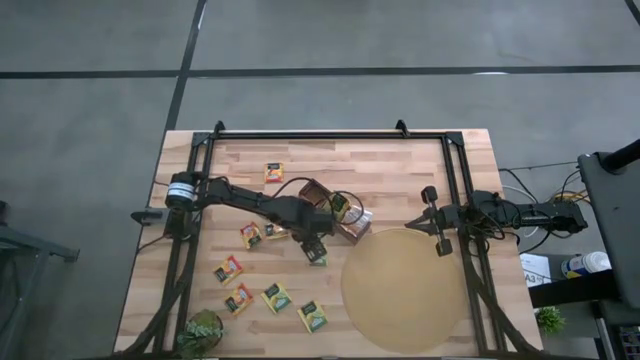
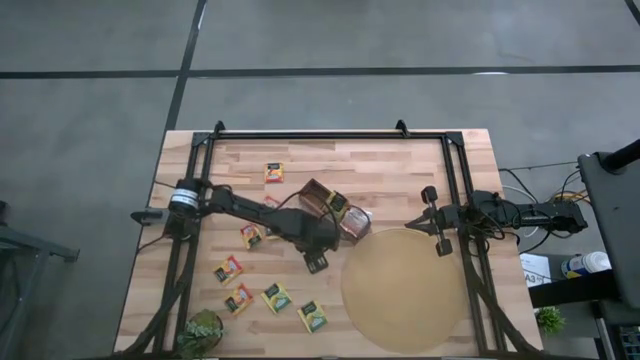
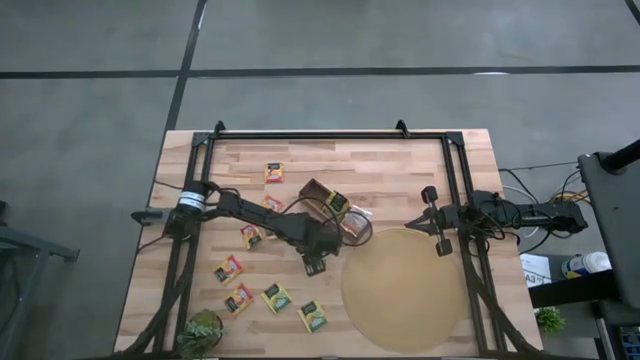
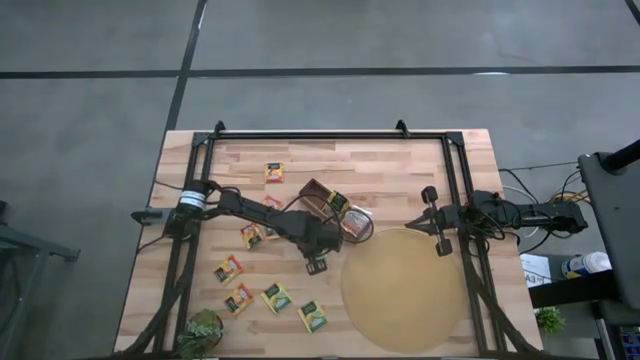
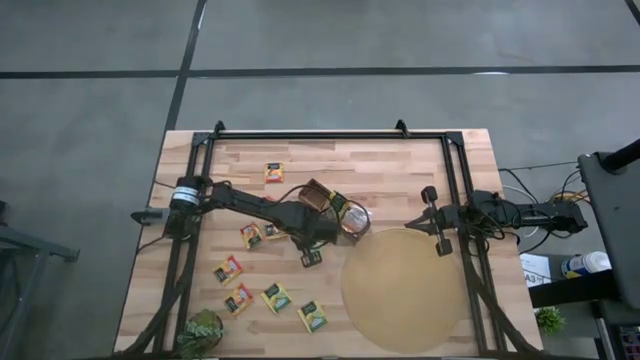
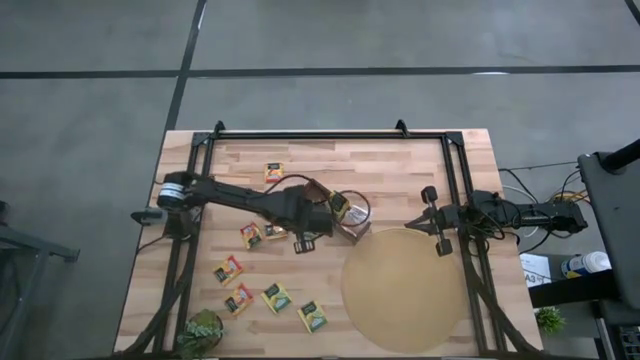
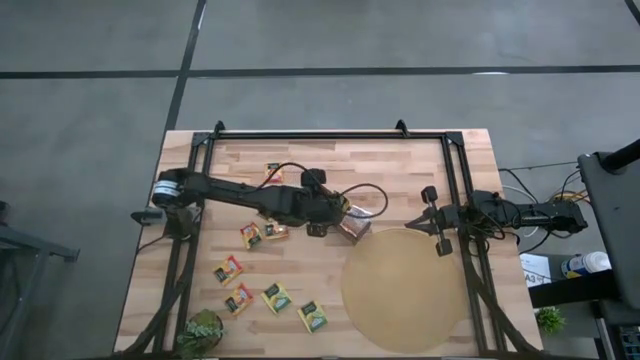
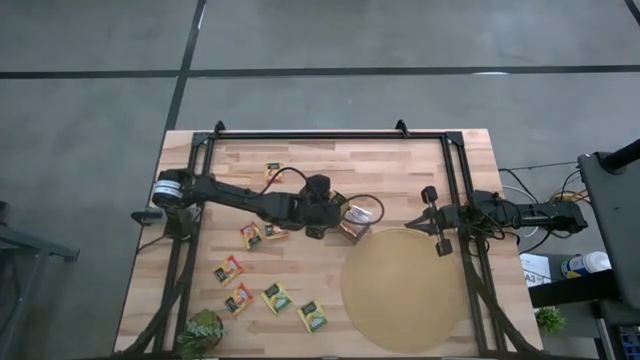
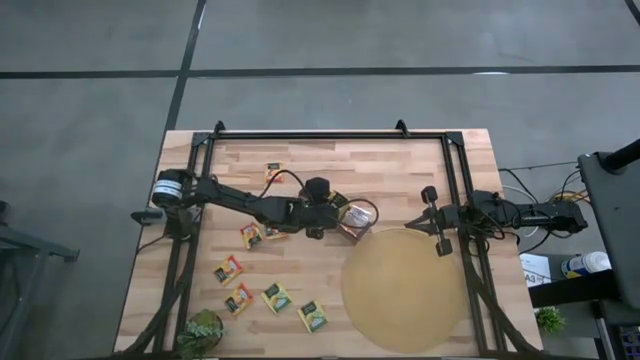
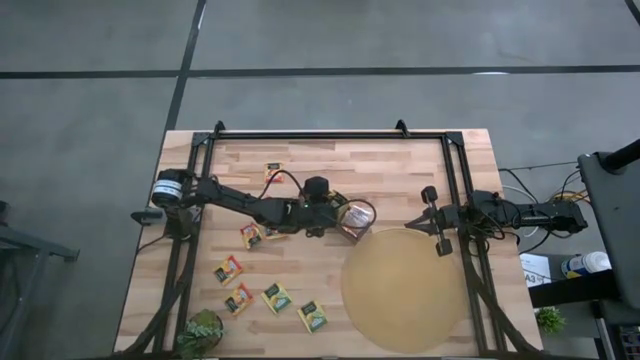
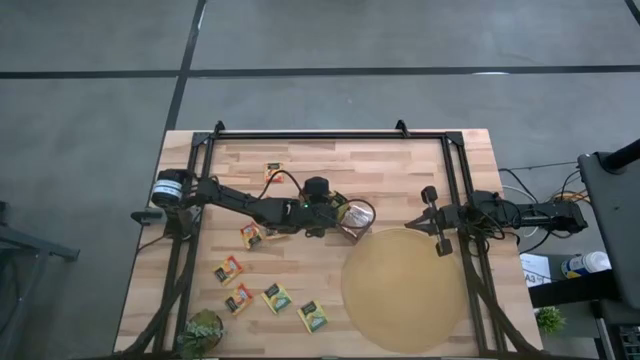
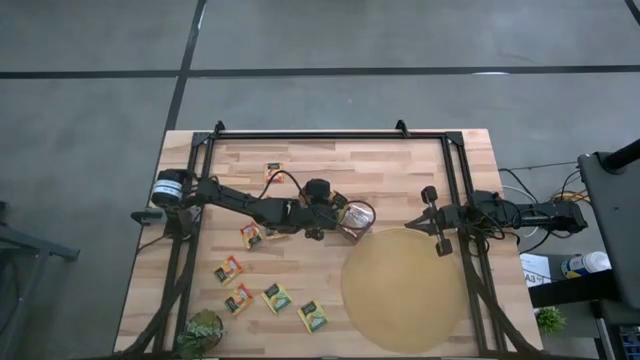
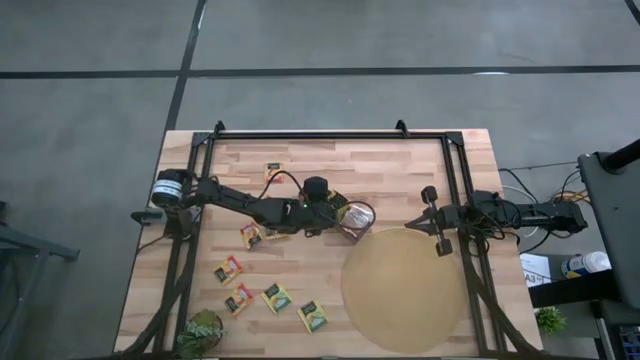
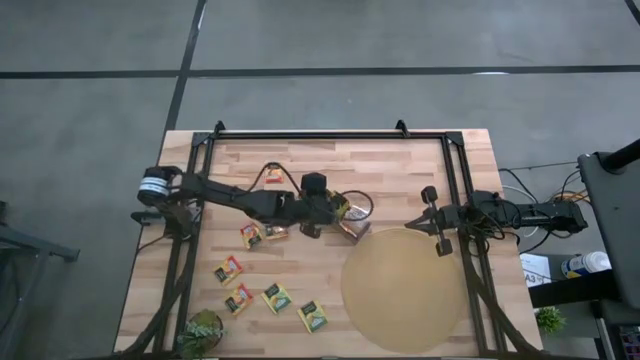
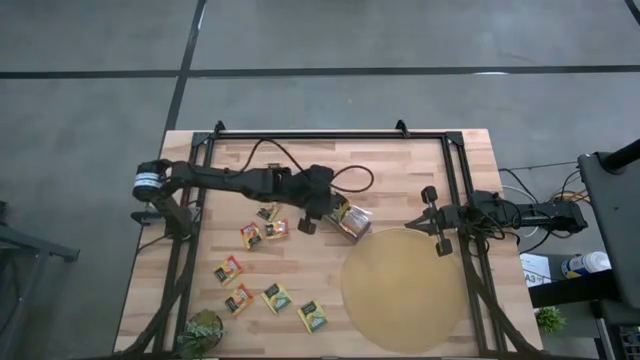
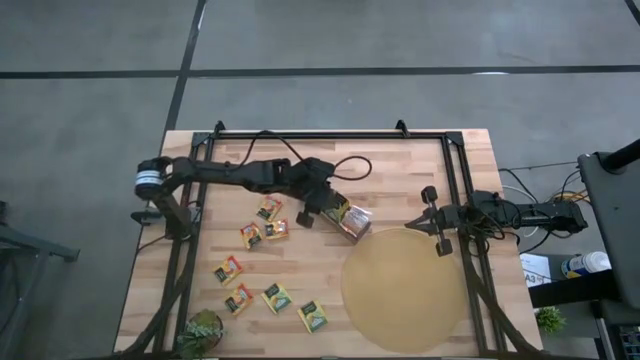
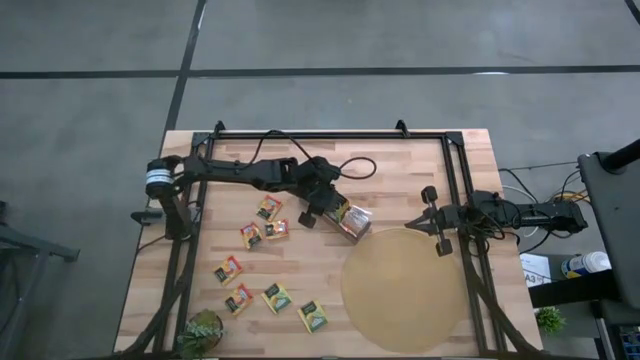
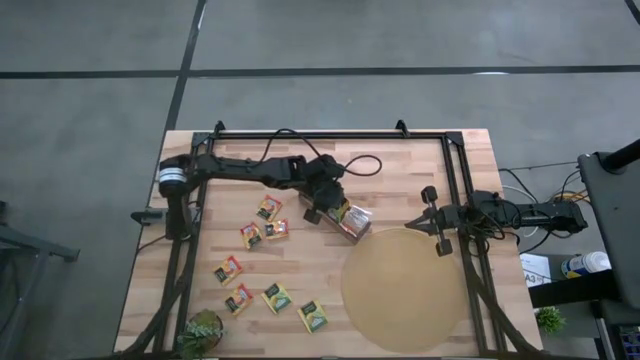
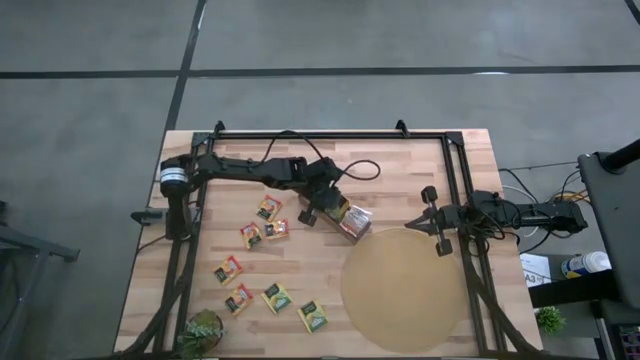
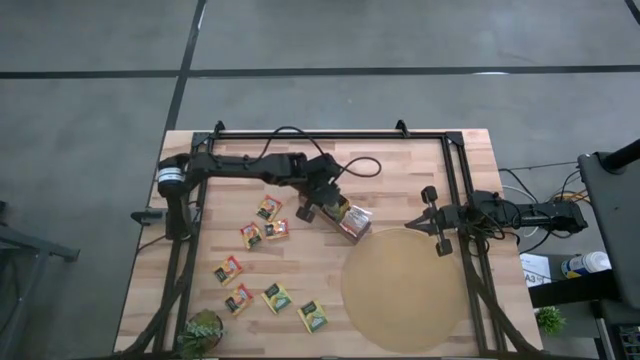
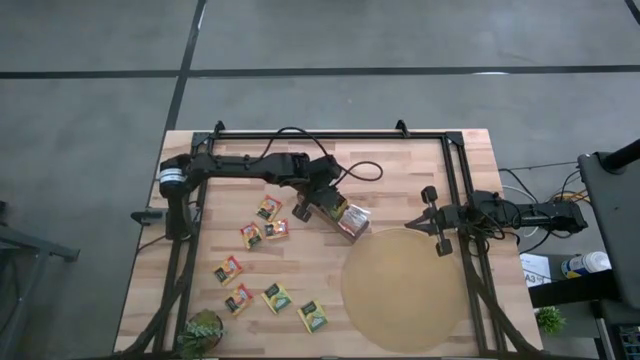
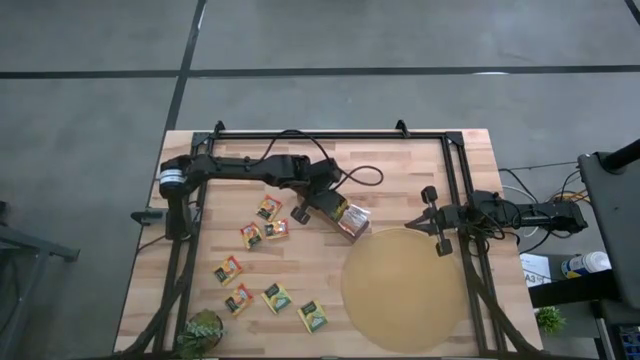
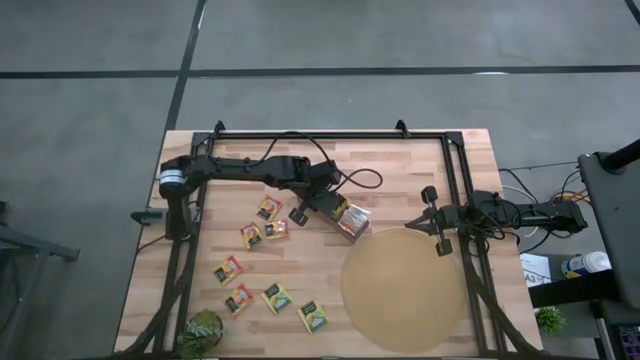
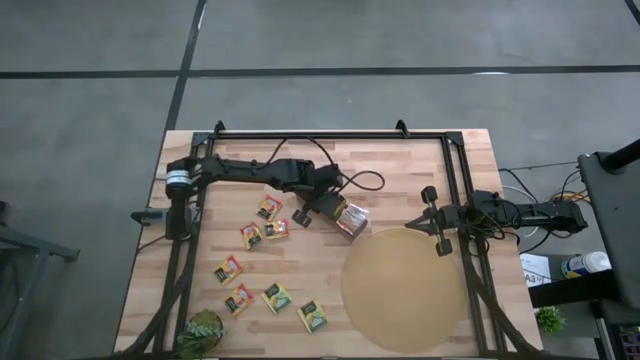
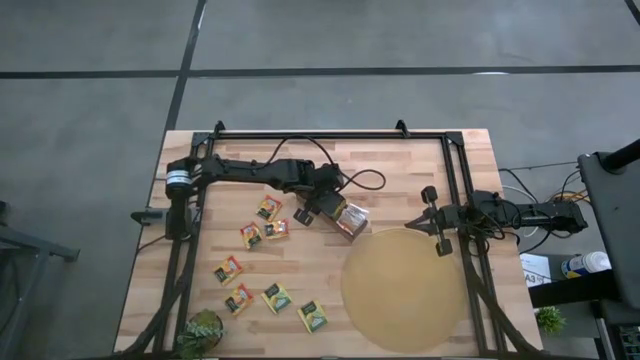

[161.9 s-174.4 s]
Task: Pick & Place Tea
Put the yellow tea bag into the middle section of the wooden organizer

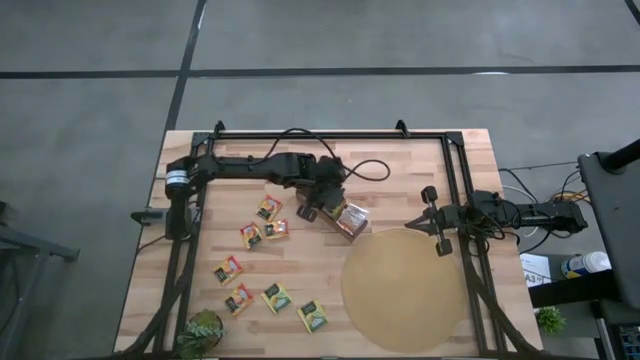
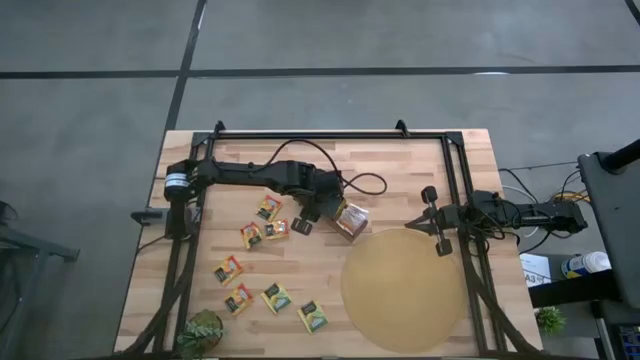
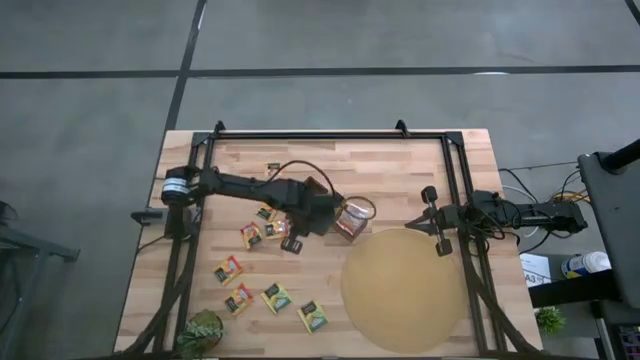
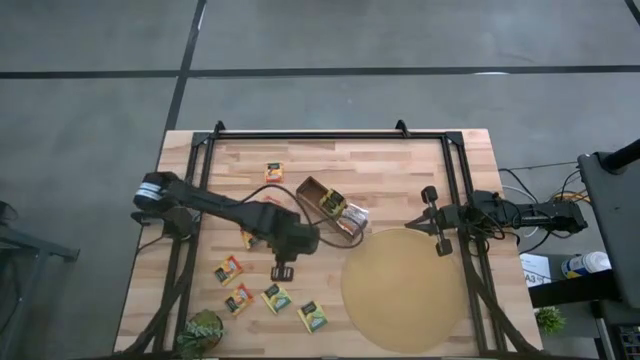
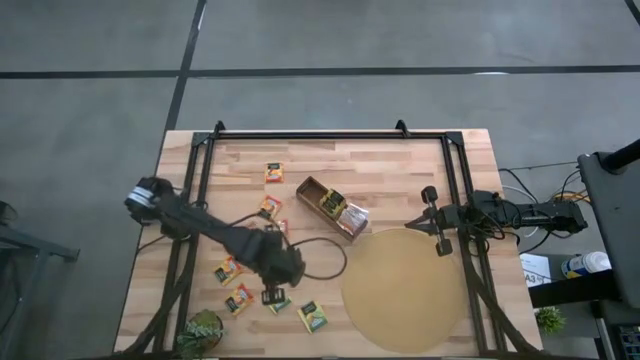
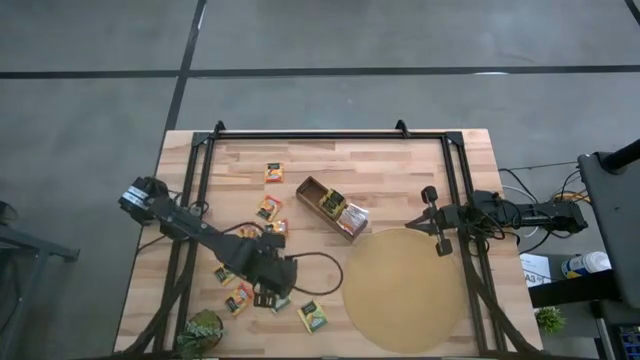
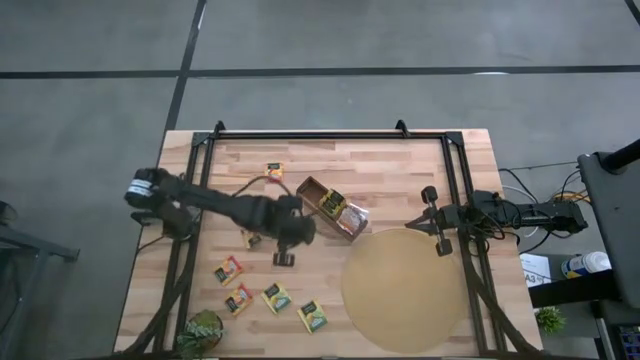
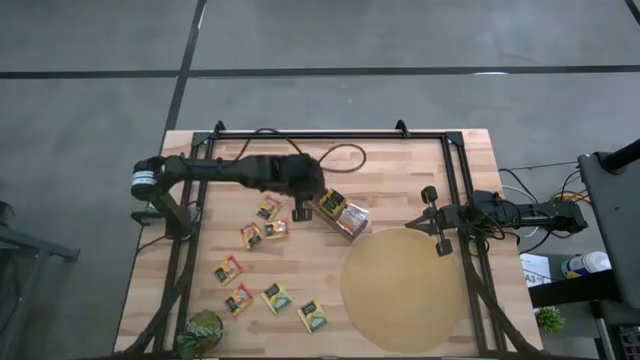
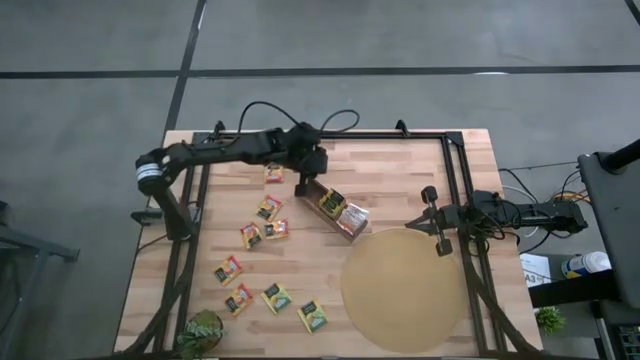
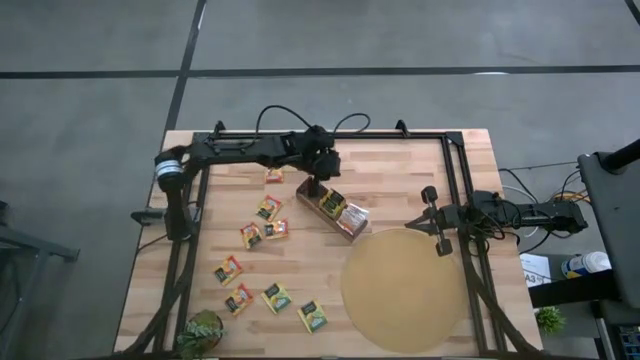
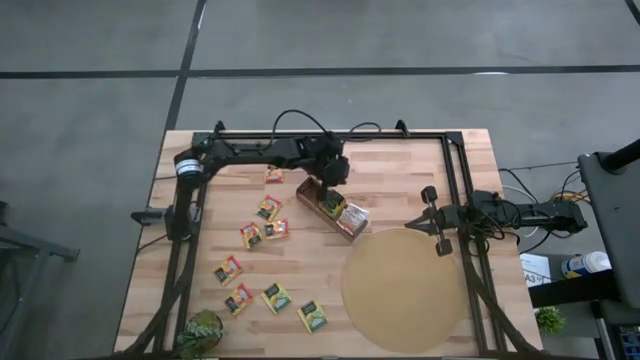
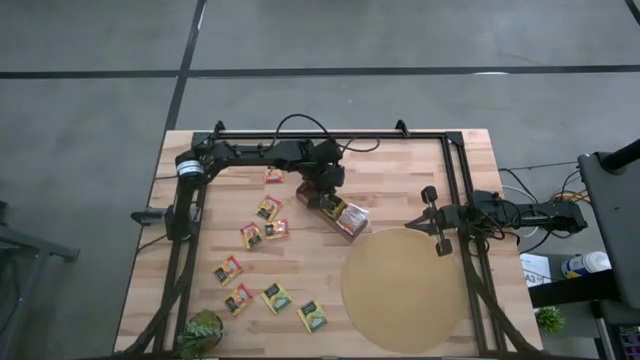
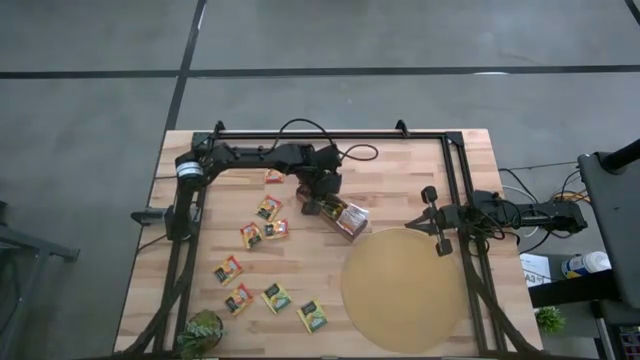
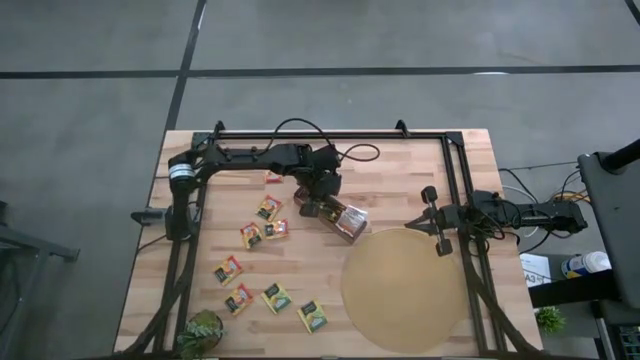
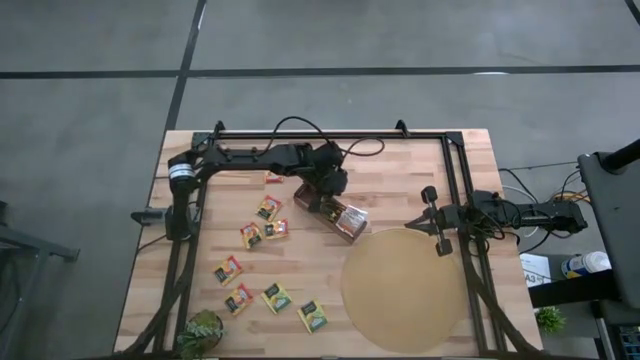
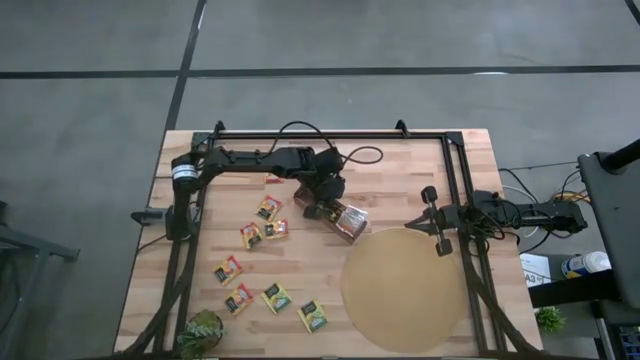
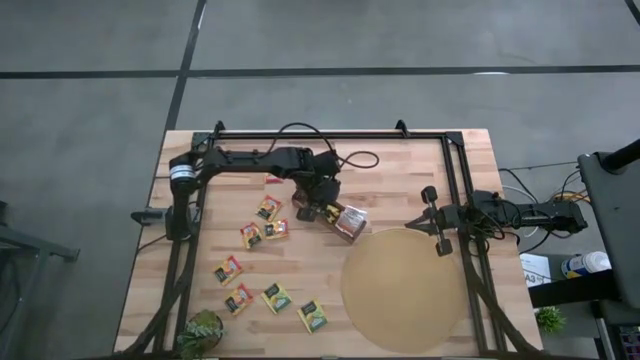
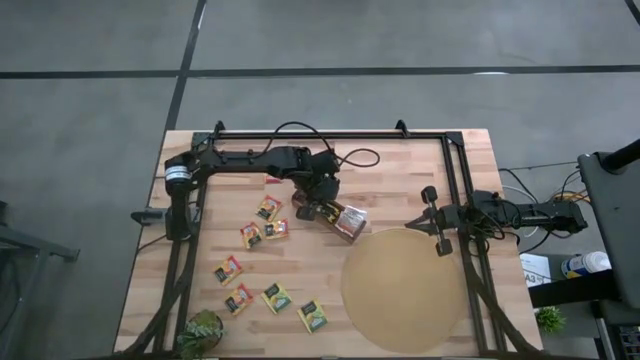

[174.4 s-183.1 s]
Adjust the yellow tea bags in the wooden organizer
